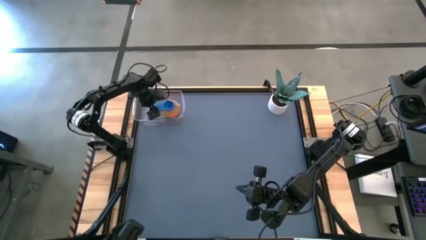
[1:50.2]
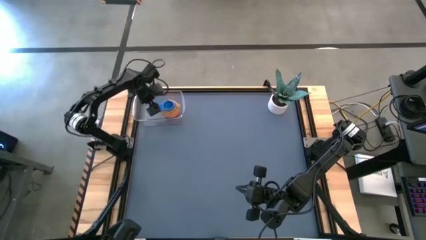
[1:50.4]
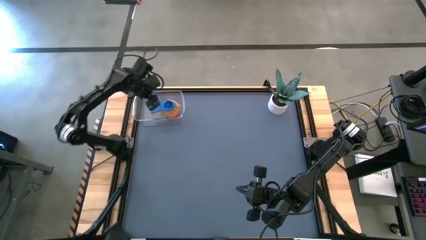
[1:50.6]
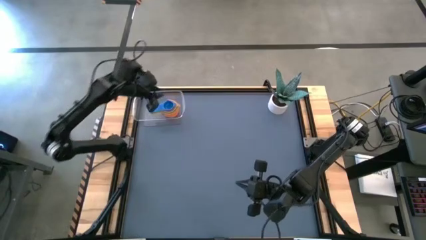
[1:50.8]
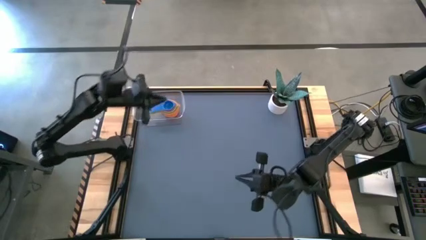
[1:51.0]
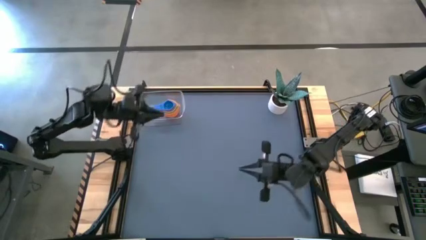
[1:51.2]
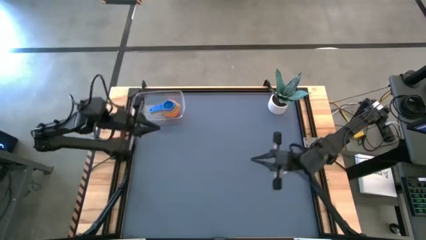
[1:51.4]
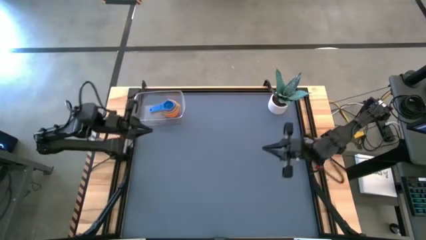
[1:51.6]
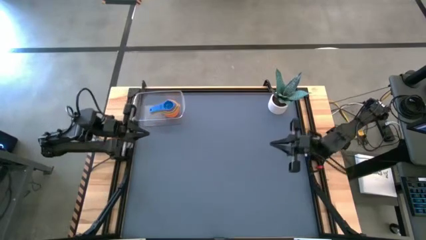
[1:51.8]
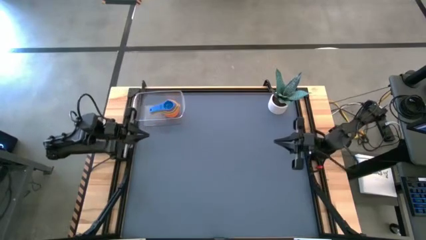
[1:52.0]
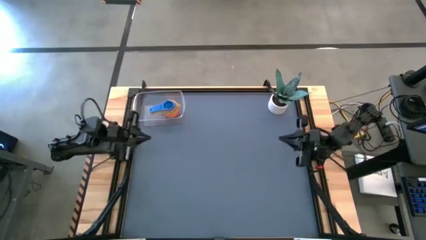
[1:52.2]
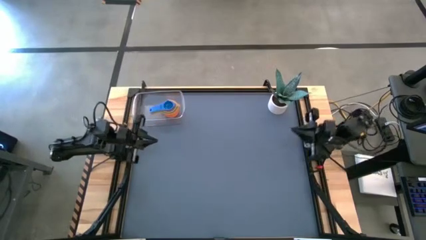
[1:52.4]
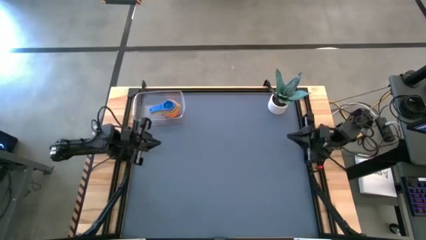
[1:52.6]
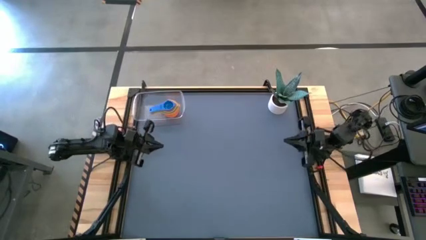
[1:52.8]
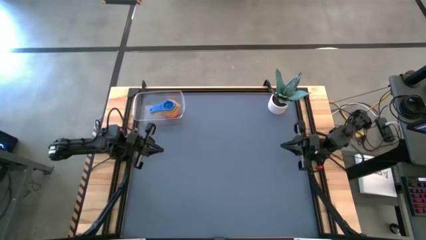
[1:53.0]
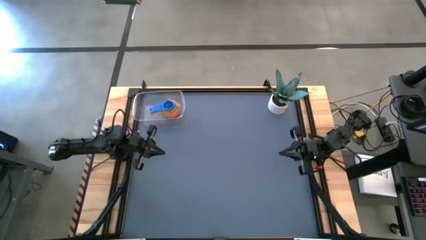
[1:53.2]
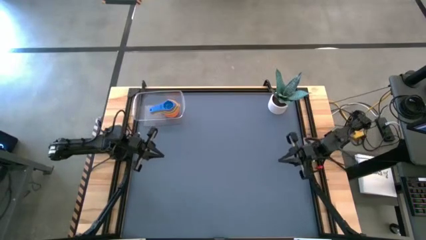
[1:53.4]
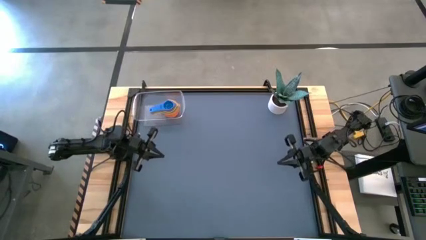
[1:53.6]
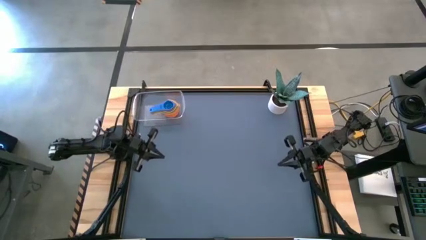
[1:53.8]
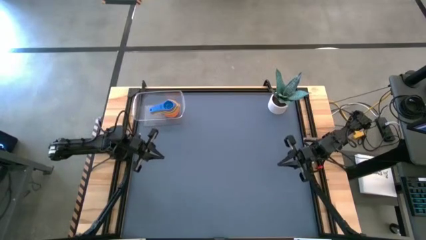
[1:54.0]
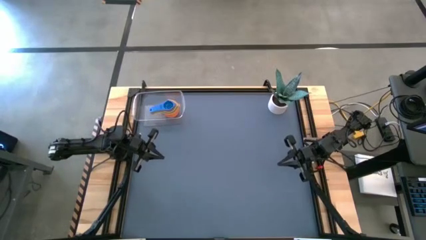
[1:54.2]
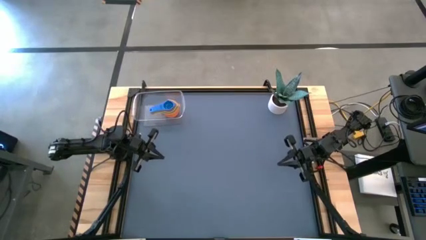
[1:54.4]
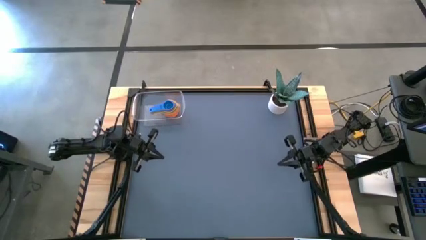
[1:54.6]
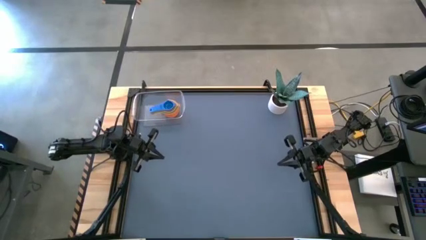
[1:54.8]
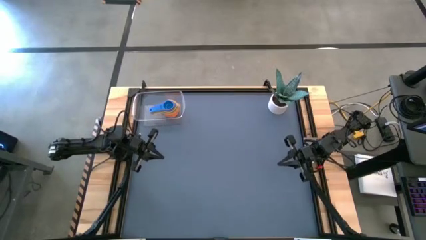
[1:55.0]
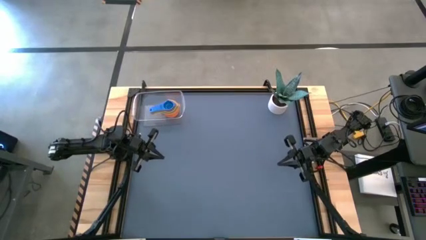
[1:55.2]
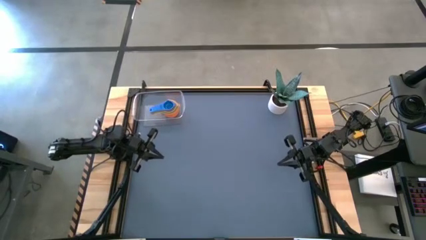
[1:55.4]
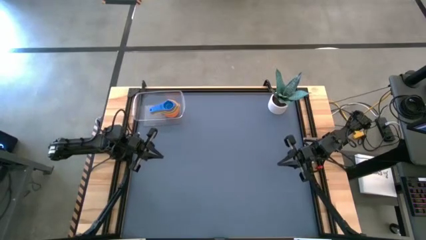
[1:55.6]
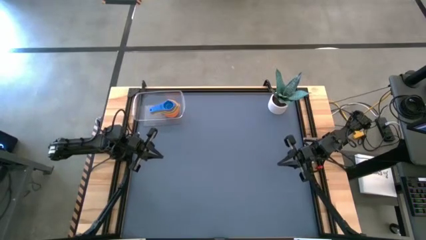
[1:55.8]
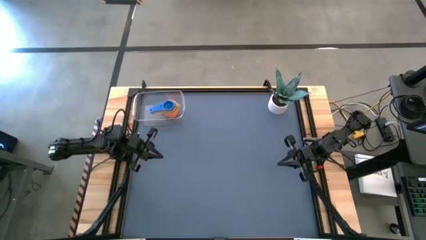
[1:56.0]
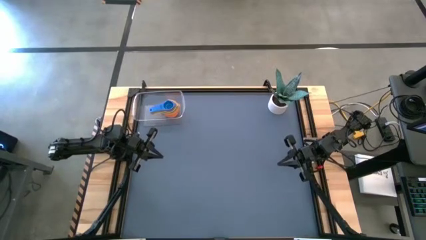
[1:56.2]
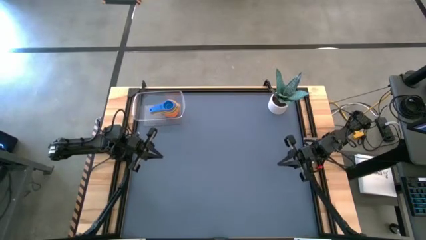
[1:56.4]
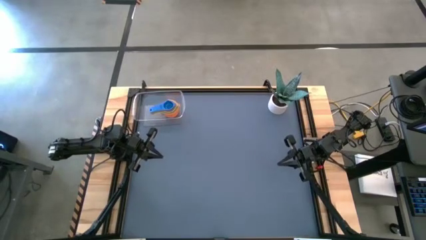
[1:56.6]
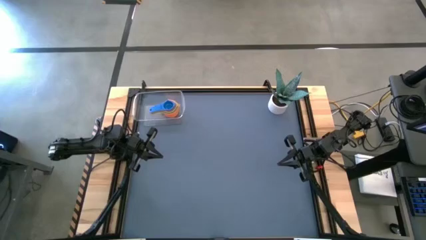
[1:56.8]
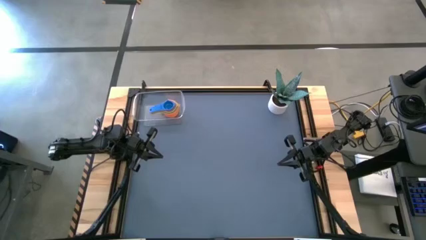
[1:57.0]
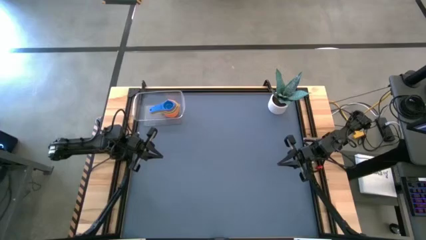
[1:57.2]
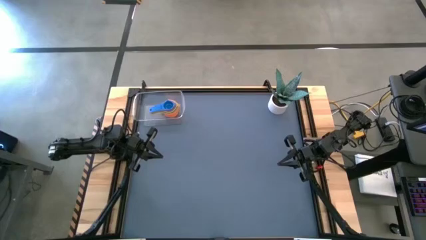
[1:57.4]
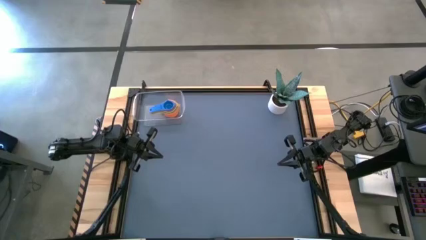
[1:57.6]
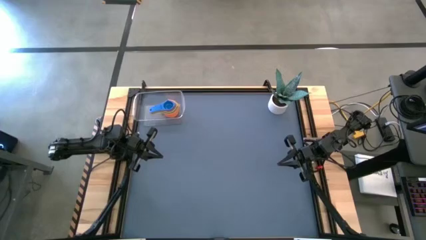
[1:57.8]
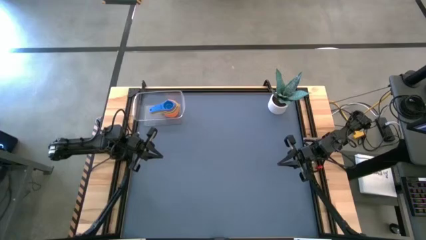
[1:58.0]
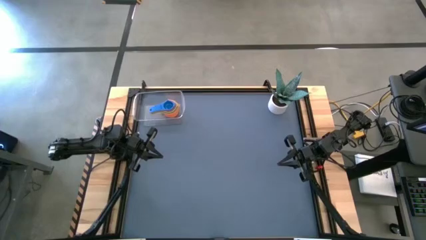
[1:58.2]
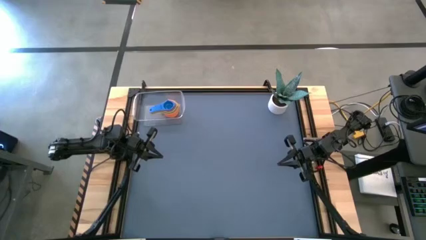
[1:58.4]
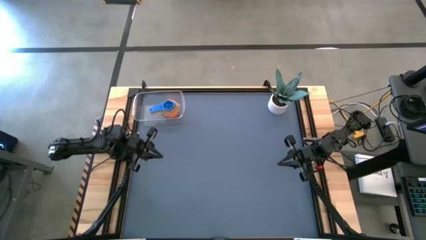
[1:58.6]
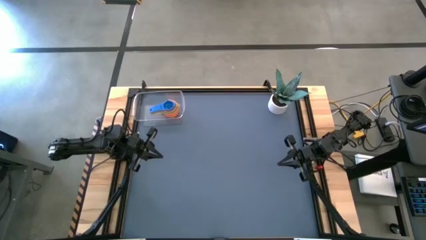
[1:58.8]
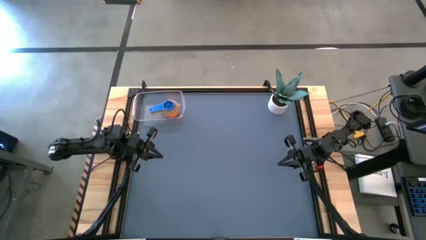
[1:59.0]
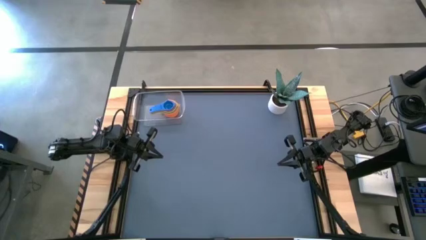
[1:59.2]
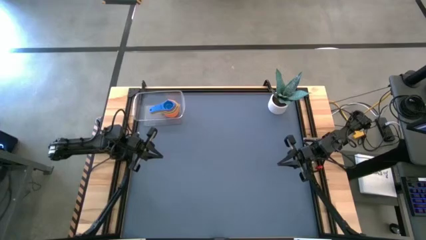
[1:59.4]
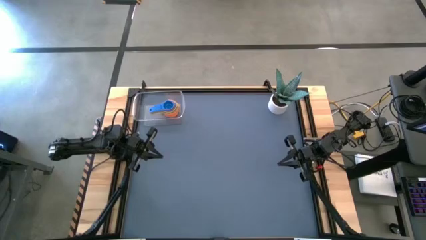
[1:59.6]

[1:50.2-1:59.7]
Task: Nest measuring cups in basket
Return to Home Position

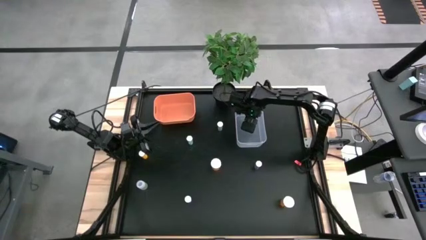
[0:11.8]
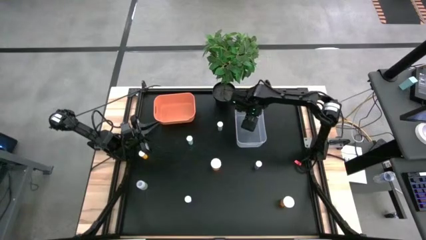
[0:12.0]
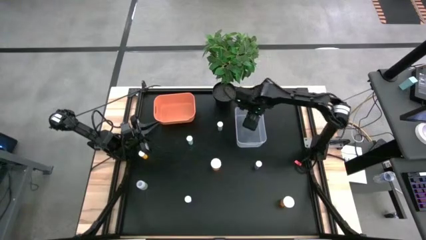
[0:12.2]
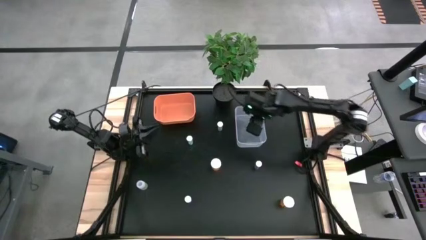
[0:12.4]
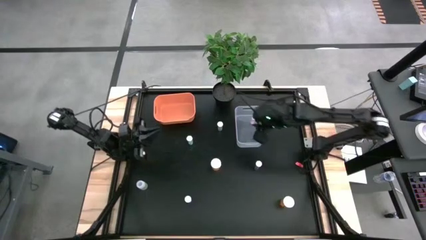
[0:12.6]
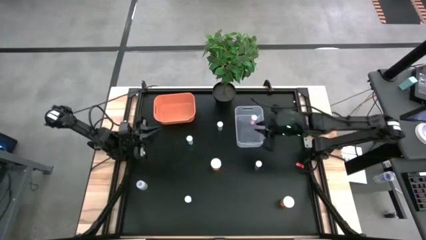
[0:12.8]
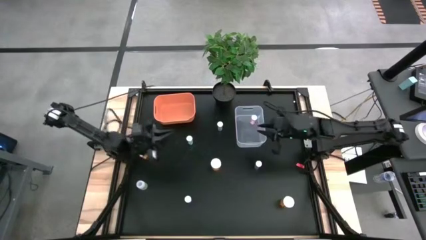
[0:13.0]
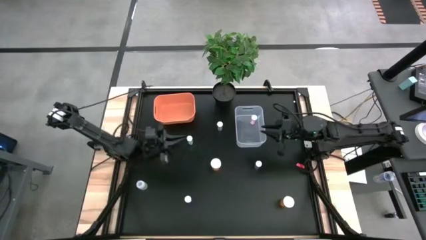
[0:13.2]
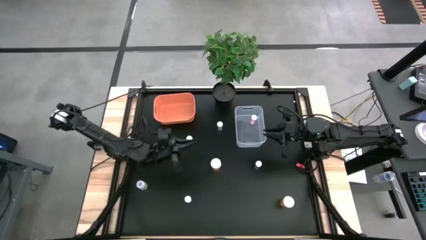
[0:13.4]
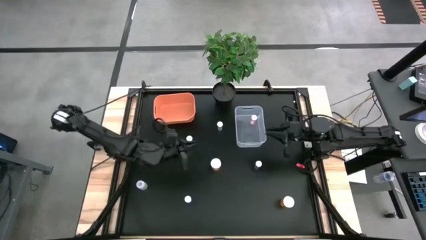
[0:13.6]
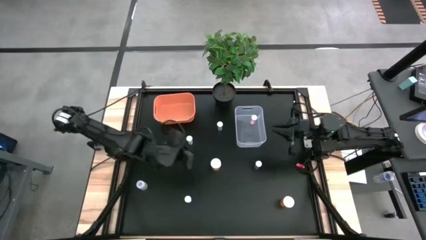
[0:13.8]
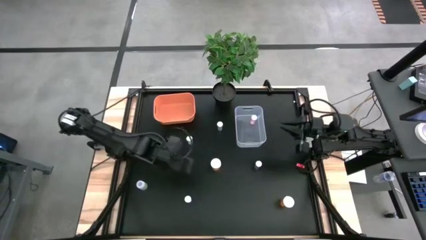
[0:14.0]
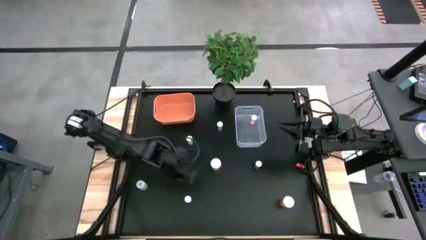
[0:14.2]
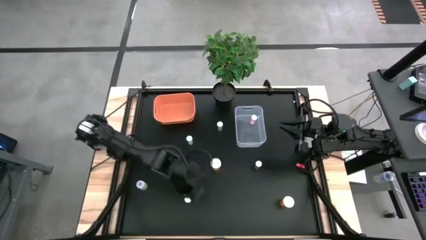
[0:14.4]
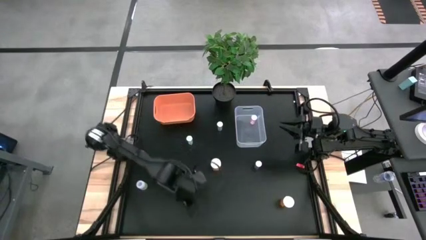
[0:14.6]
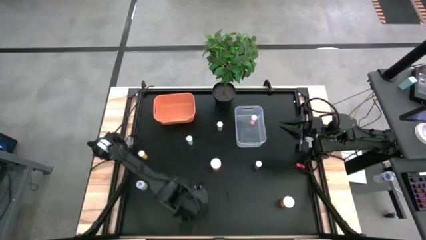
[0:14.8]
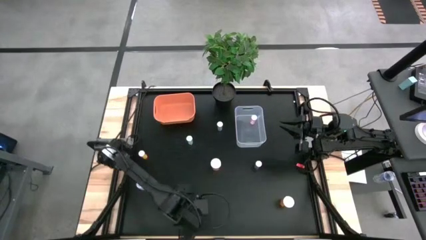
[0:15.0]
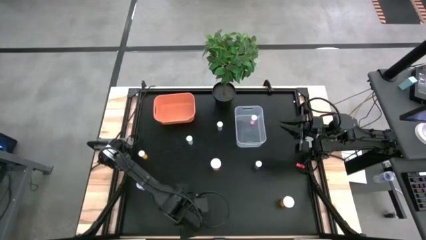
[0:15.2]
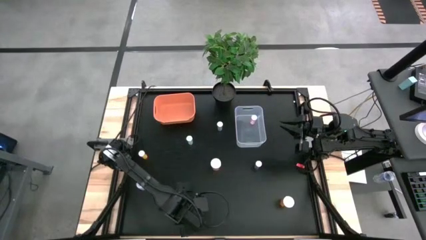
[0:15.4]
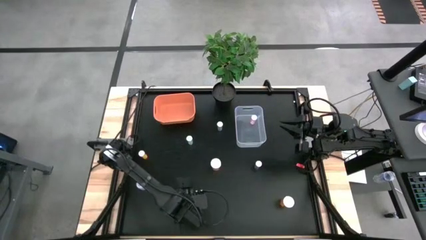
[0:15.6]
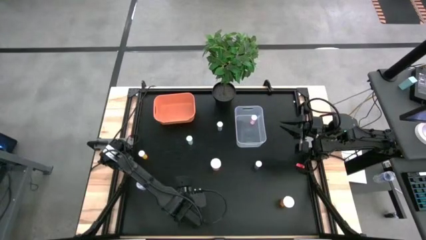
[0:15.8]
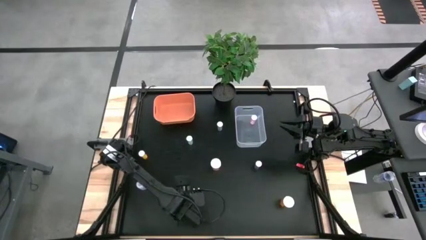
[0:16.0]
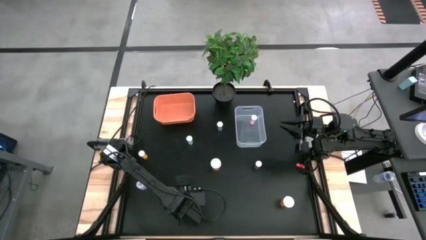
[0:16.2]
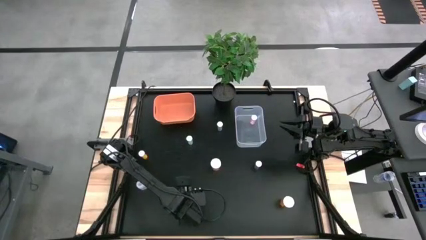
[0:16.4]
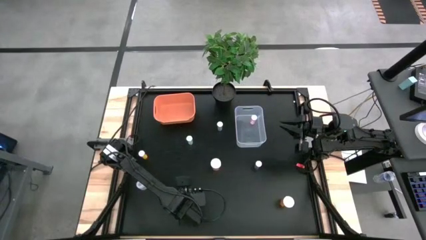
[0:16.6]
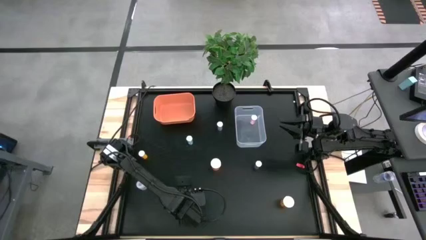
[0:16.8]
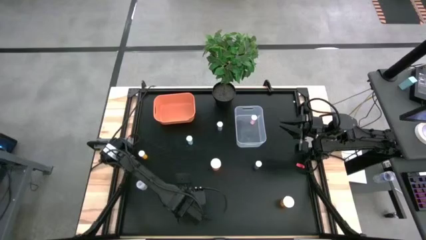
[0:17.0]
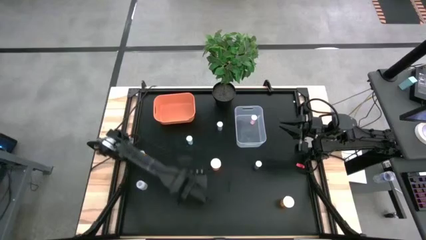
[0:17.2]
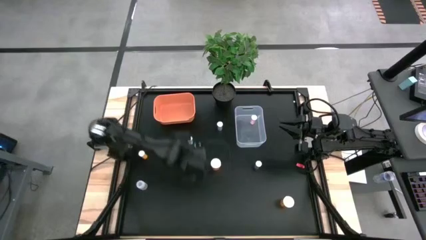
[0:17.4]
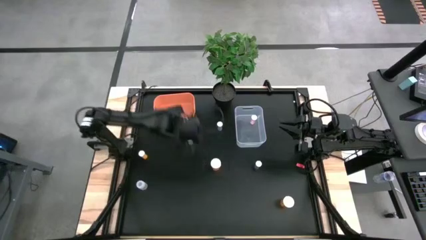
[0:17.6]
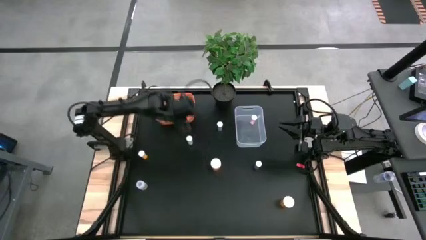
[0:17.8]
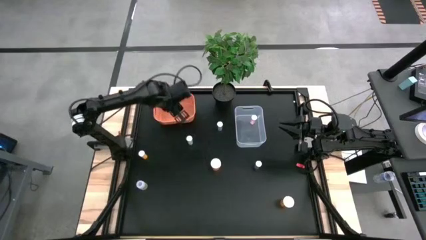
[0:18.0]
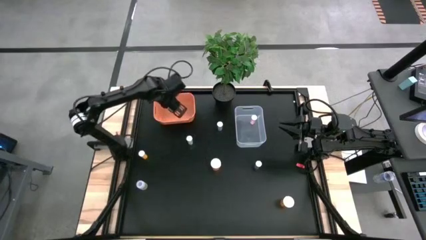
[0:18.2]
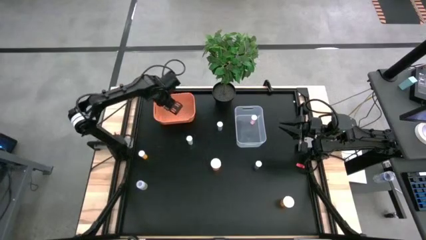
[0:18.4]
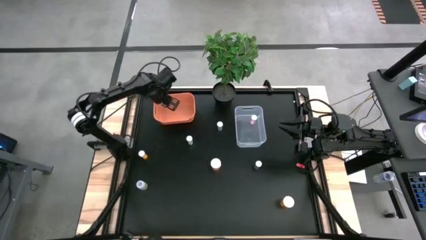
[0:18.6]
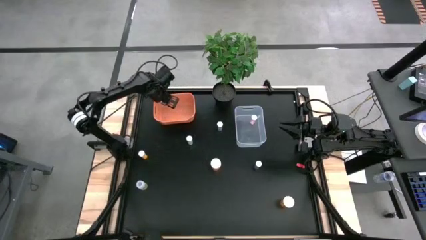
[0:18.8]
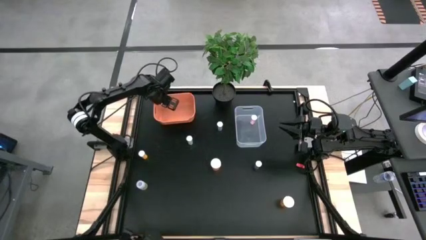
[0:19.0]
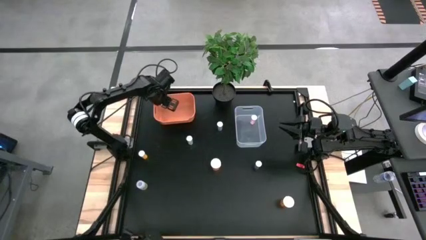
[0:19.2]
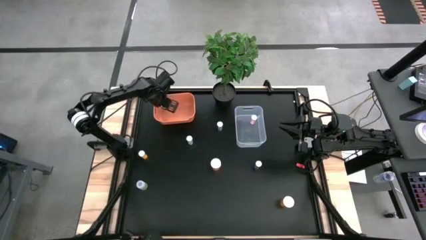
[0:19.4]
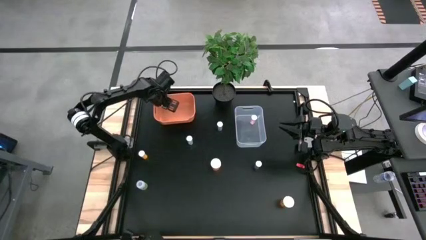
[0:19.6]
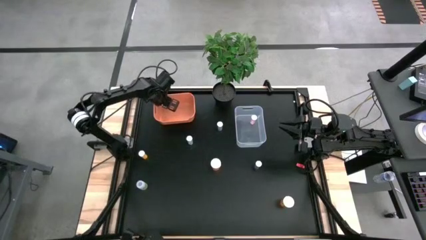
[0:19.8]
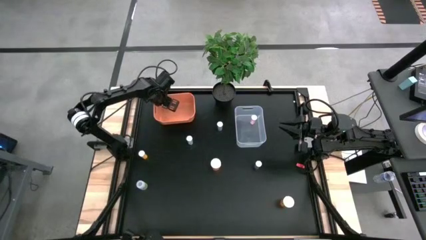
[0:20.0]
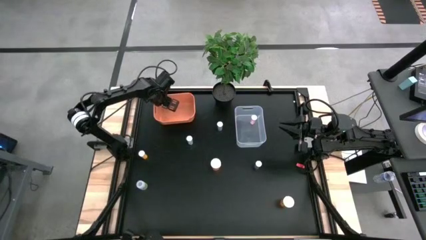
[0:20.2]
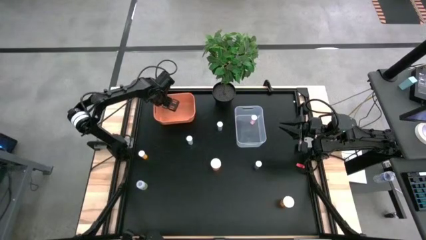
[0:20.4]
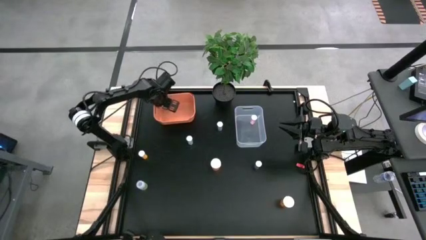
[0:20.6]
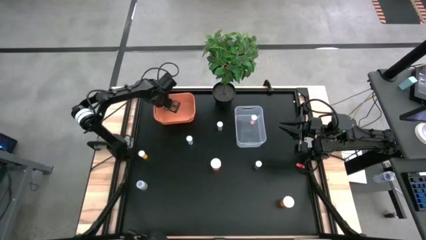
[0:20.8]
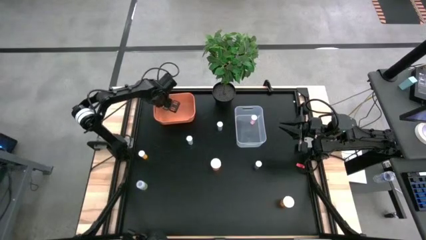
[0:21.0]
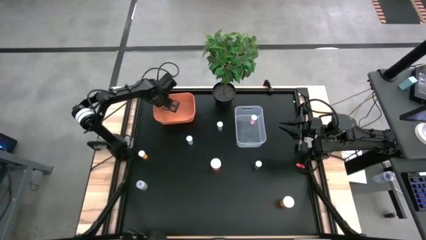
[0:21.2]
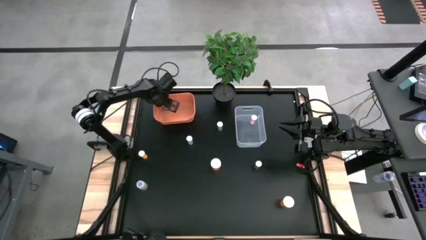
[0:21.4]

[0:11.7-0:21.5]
Task: Pick and place medicine bottles into bin by pill shape (circle, oval)
Put the blue tablet pill bottle into the orange bin
